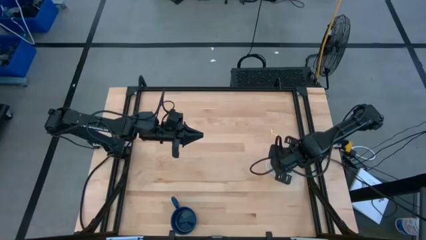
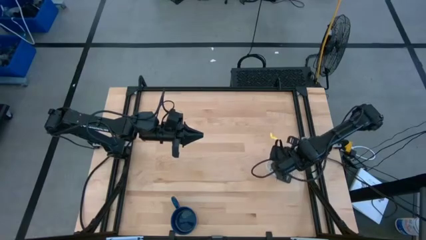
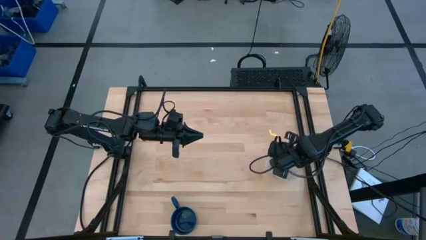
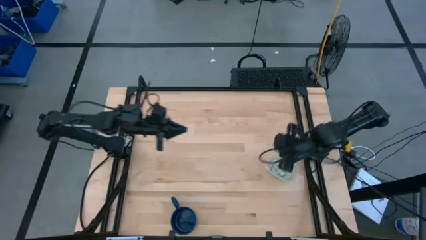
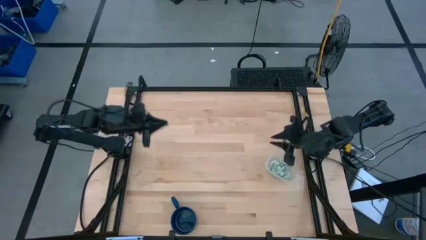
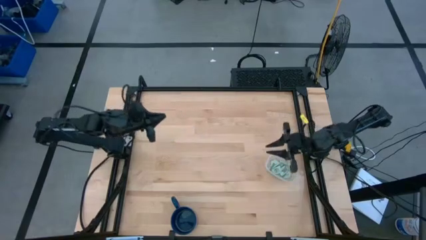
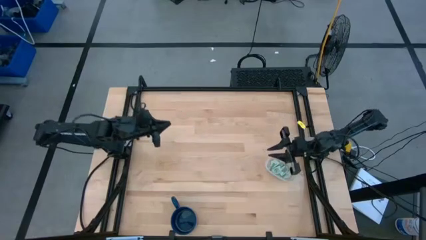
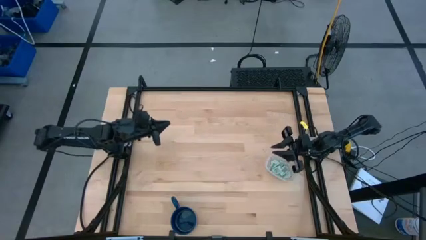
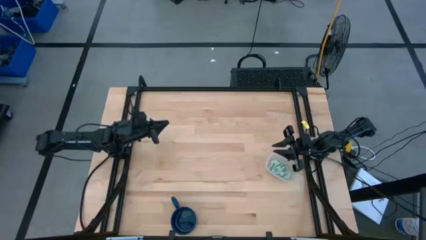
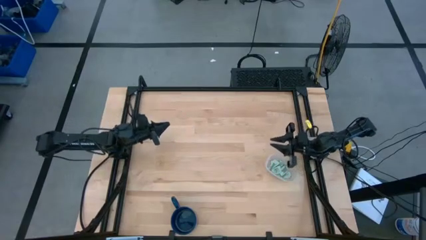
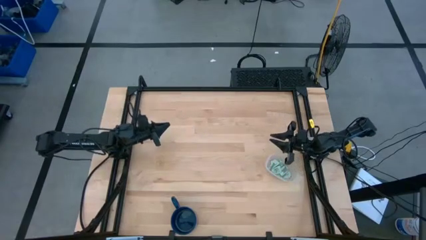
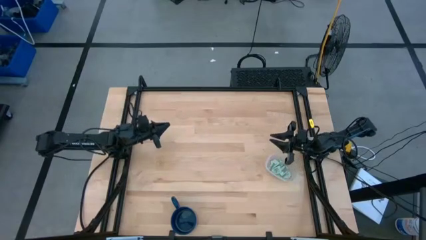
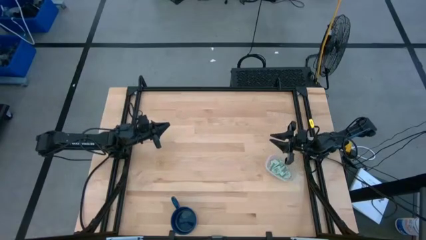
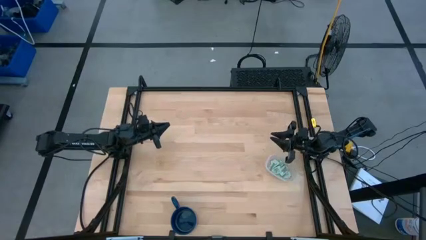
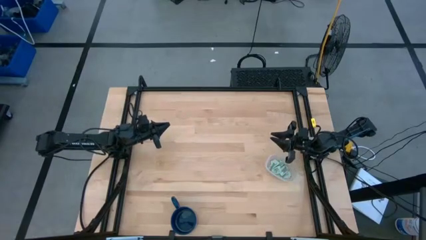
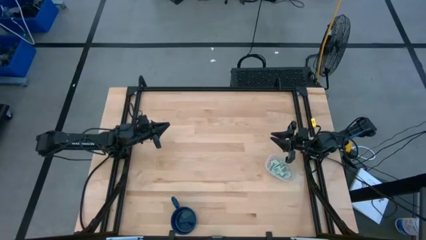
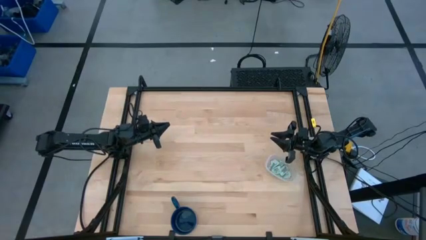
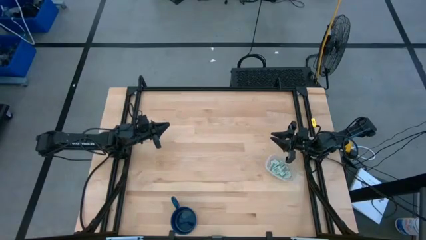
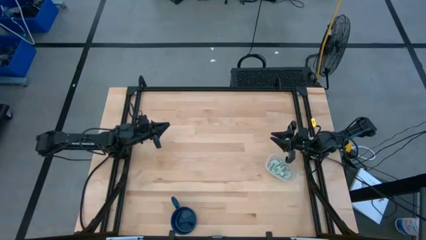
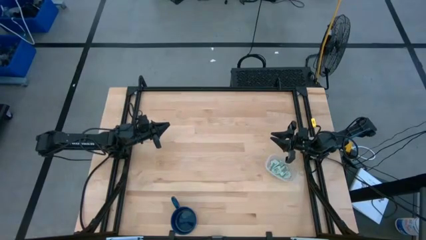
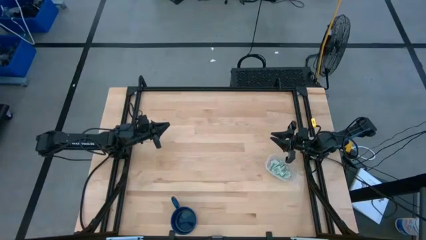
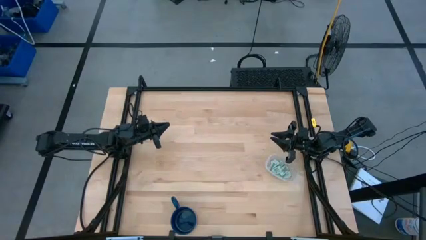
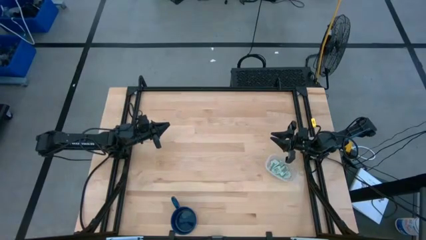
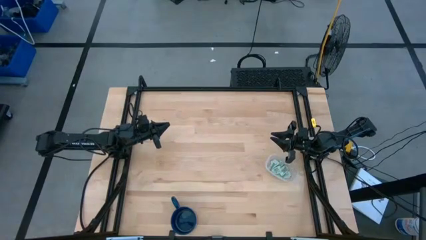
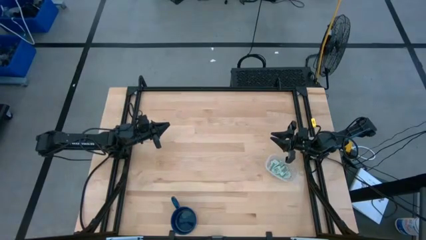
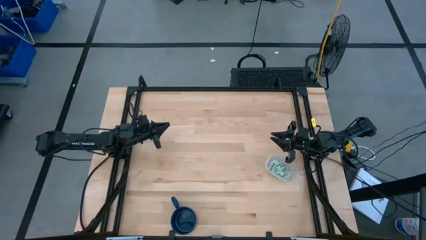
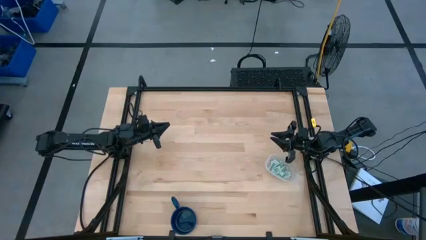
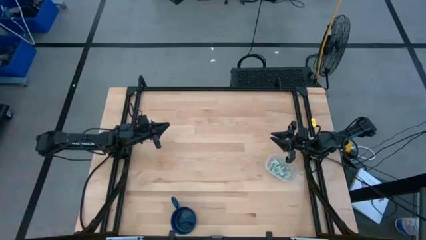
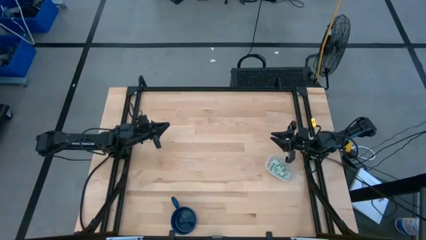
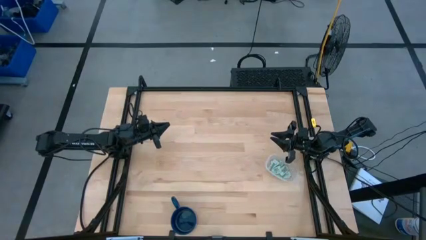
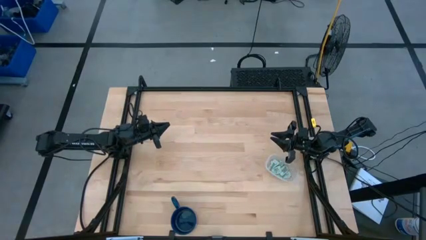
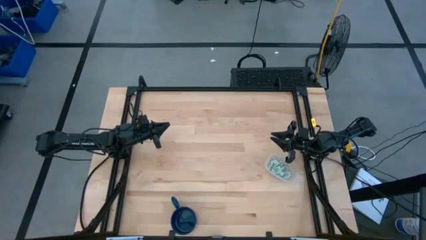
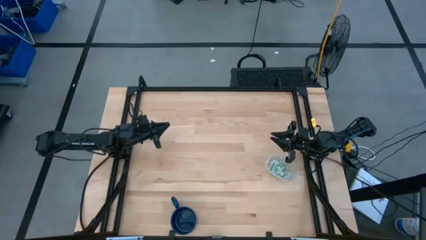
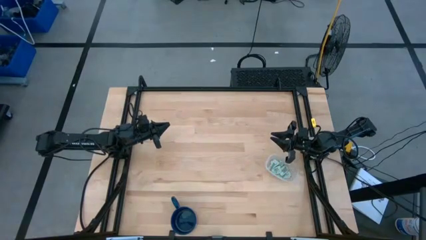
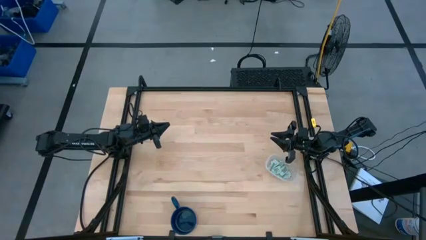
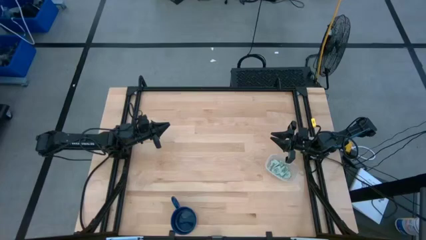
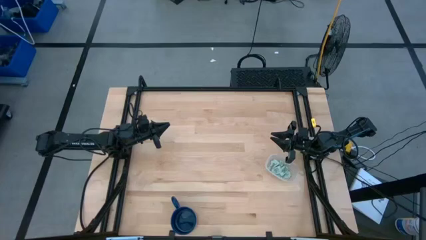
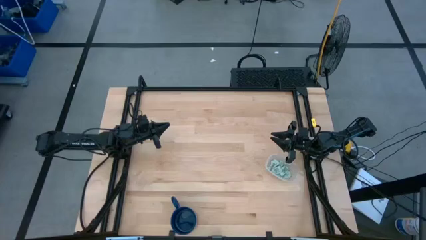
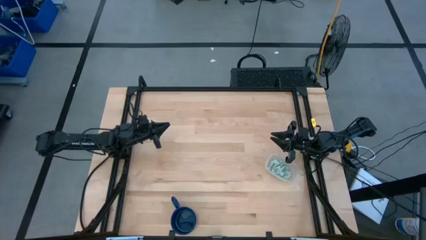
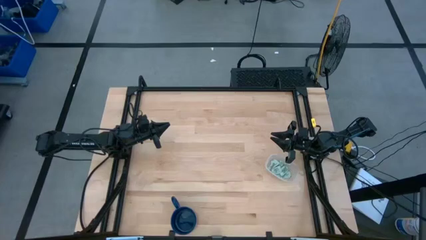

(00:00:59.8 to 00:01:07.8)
Task: Pick and place Stevia / Truvia into bins
Return to Home Position

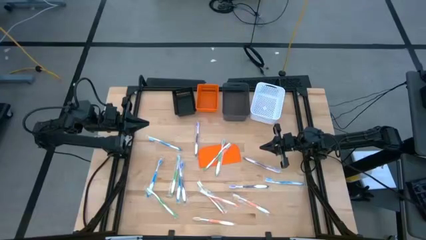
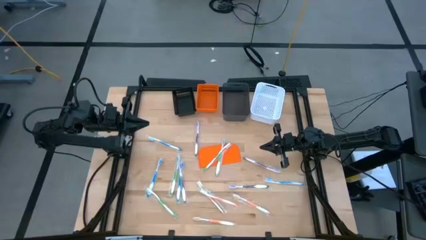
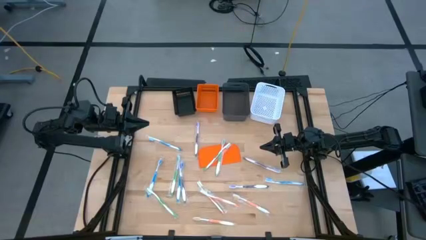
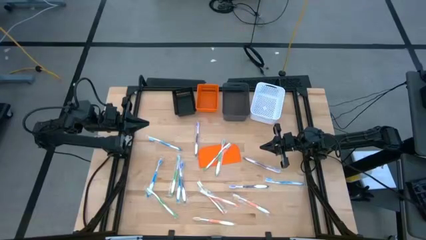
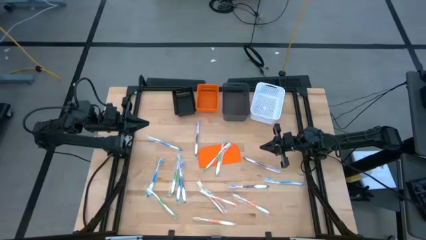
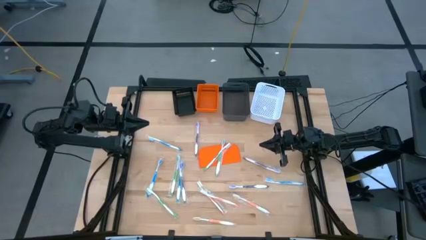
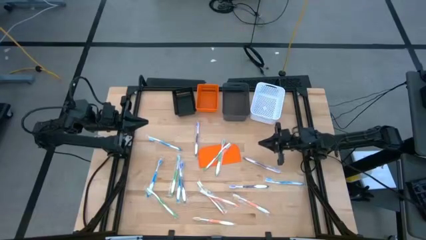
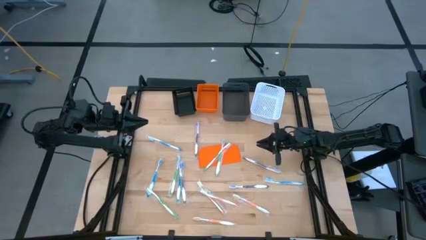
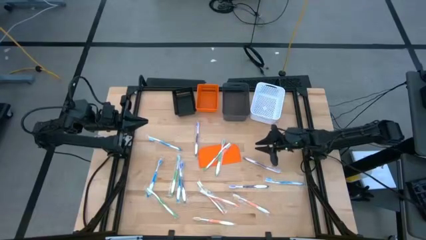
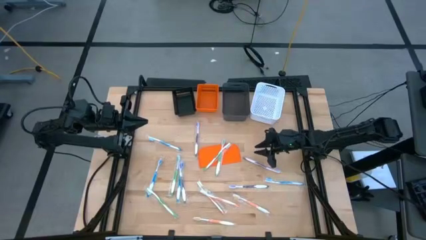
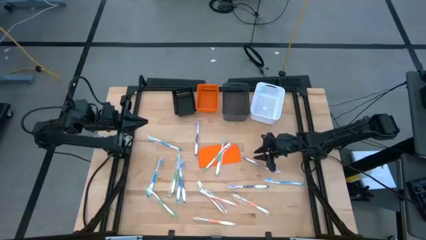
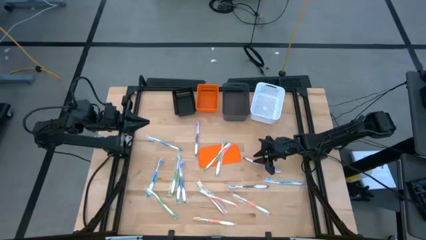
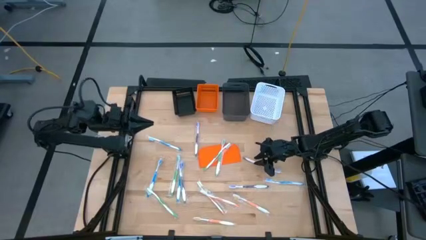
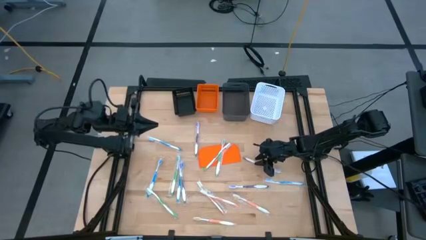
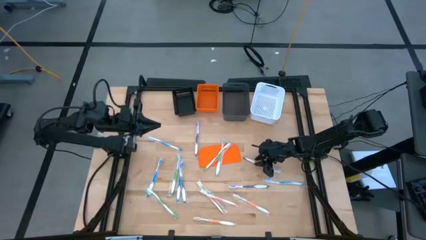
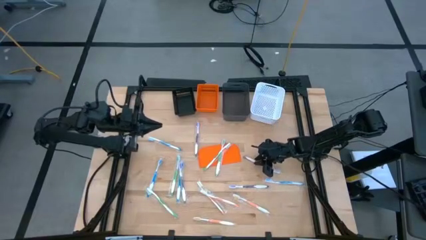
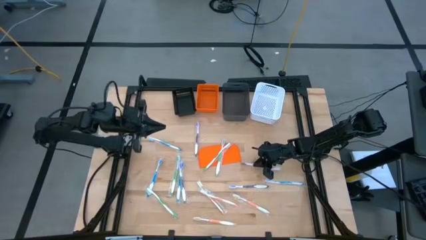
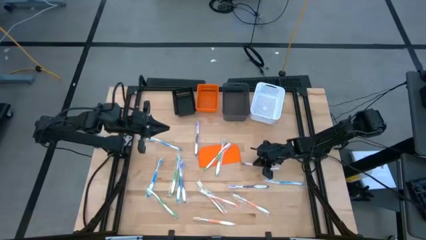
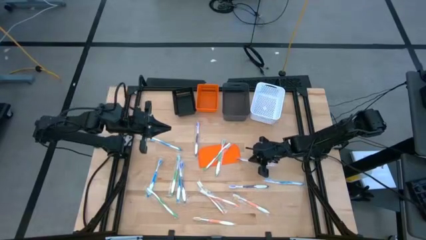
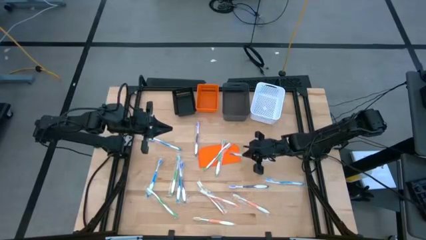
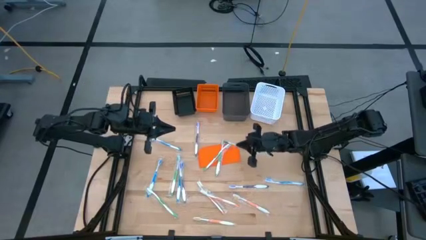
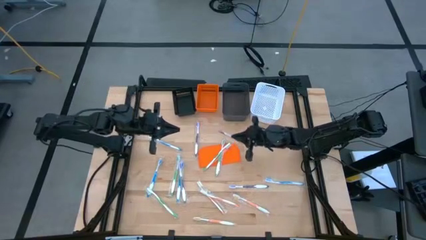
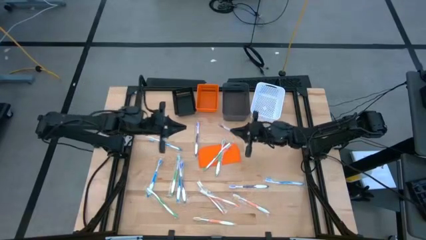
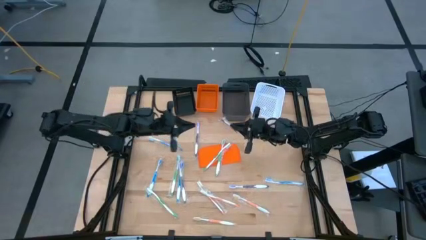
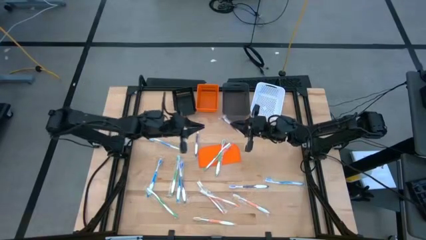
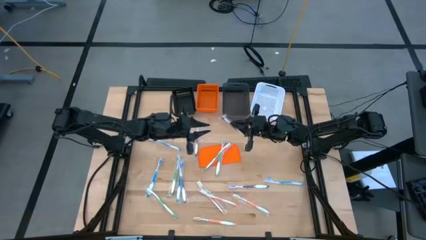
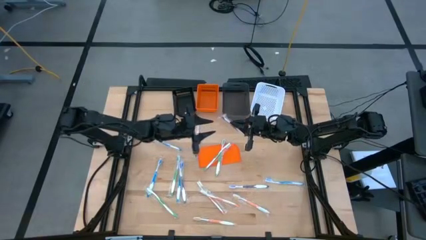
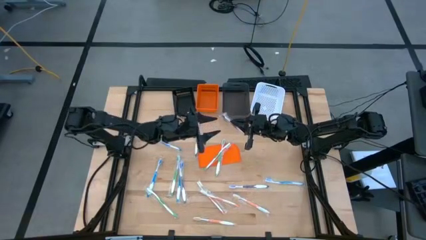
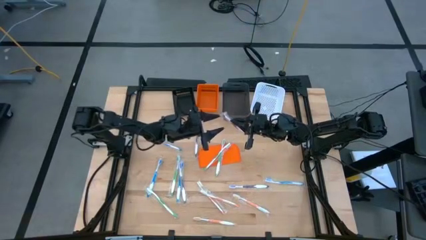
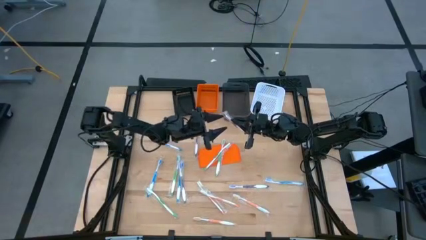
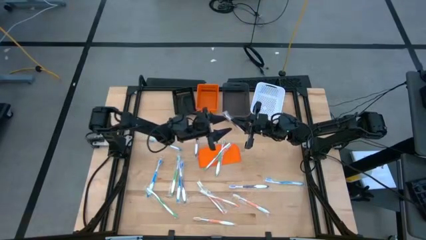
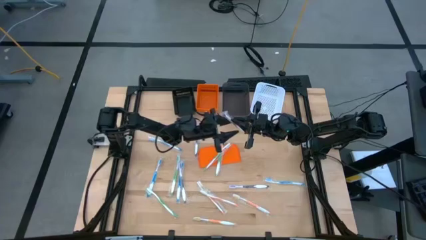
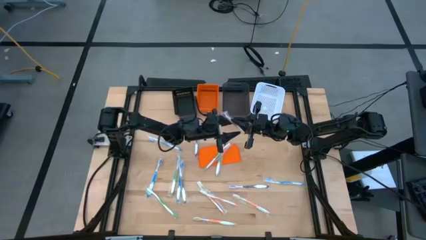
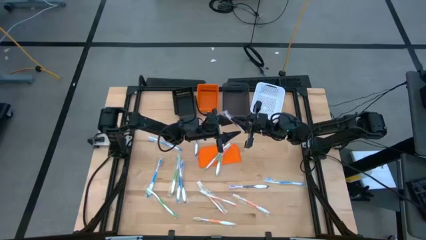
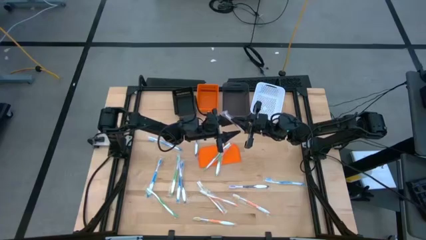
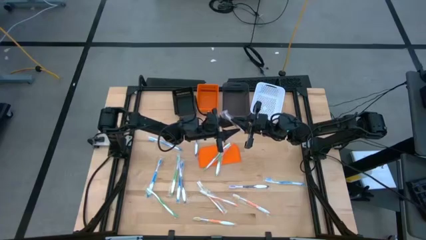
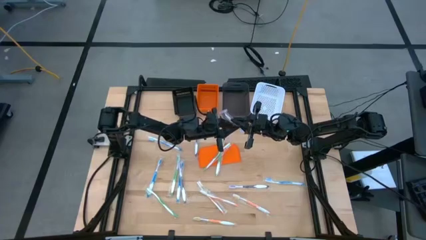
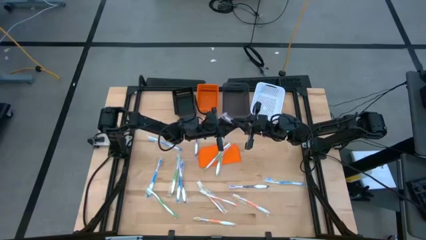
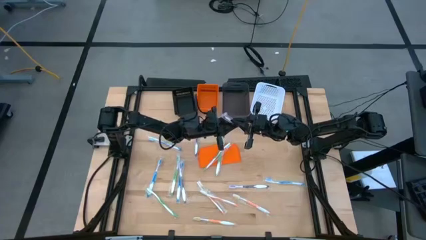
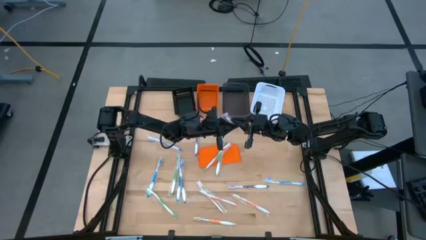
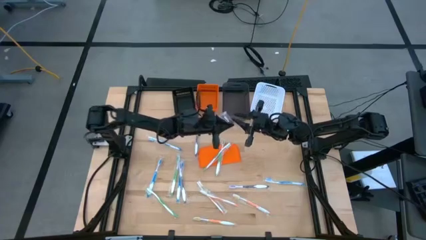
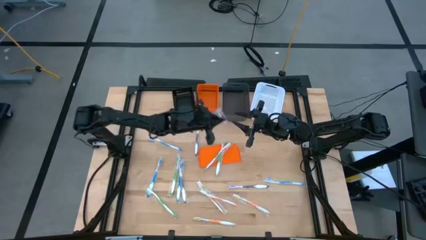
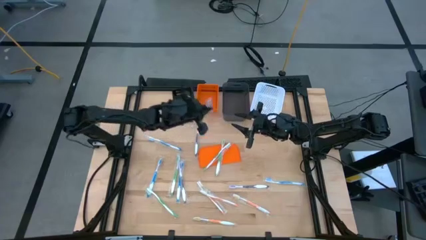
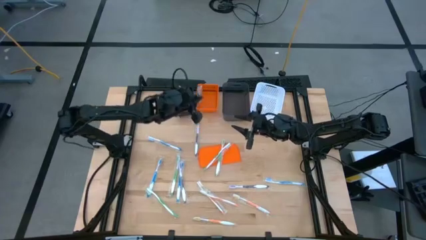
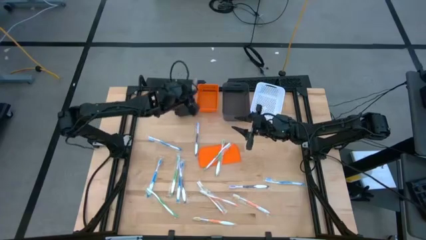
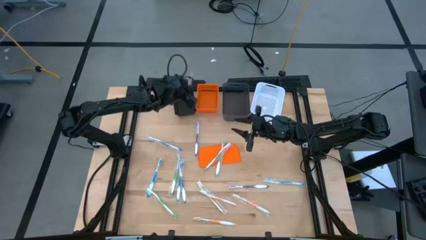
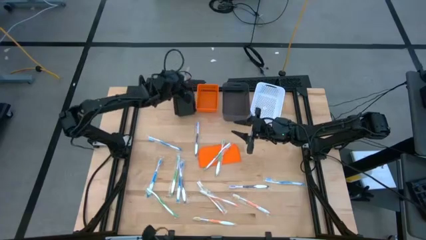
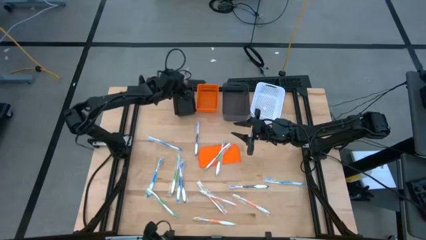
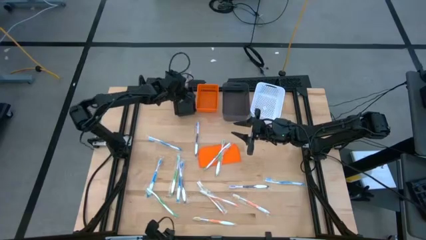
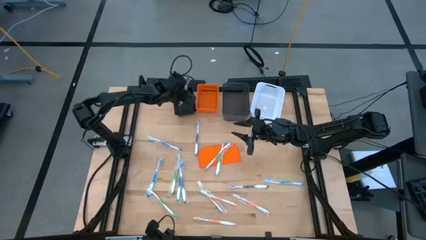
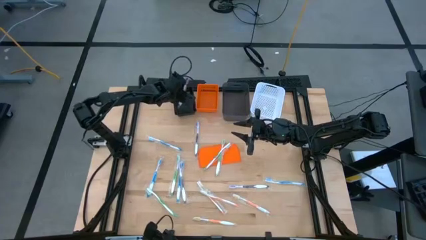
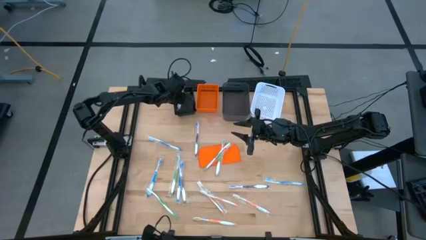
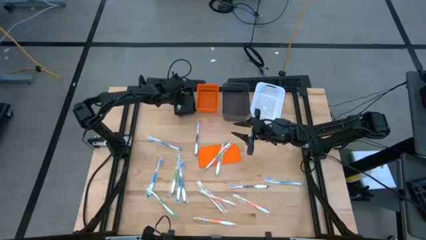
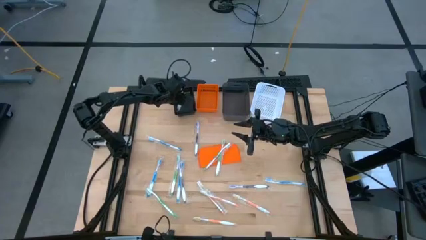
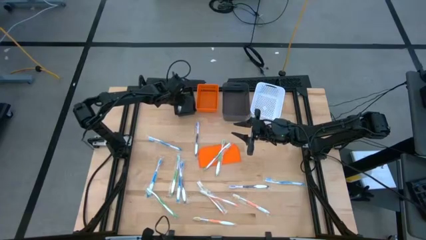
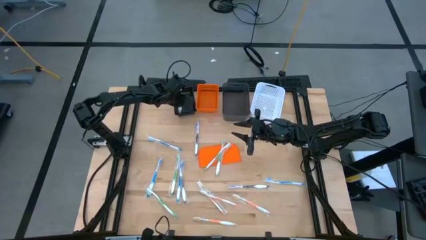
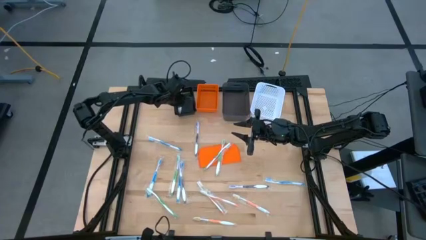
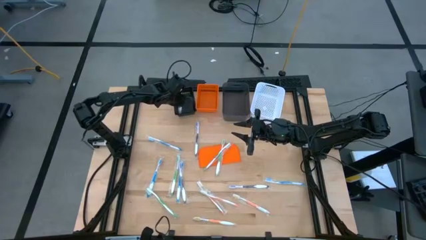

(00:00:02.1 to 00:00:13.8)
Task: Pick & Place Toothbrushes
Put the violet toothbrush into the black bin
